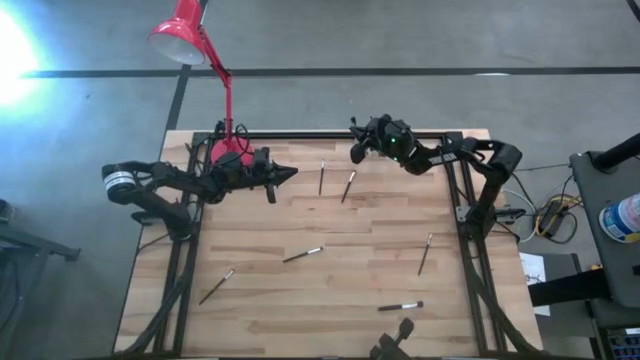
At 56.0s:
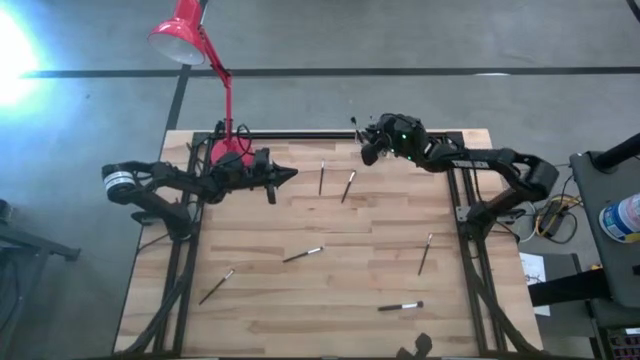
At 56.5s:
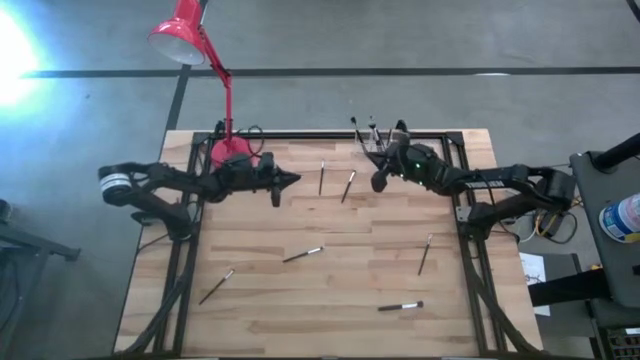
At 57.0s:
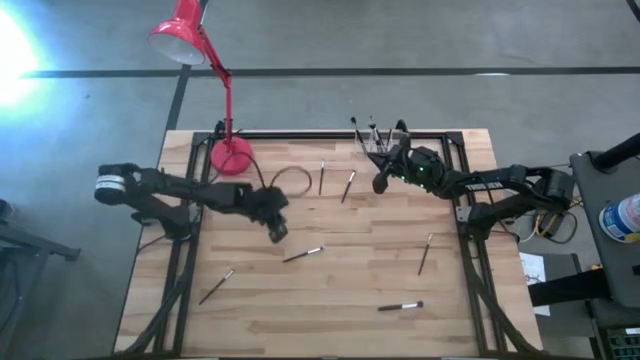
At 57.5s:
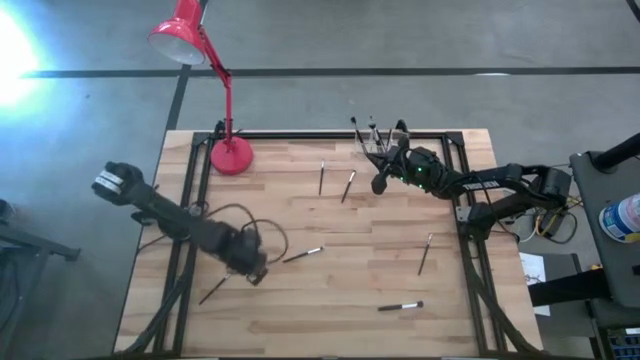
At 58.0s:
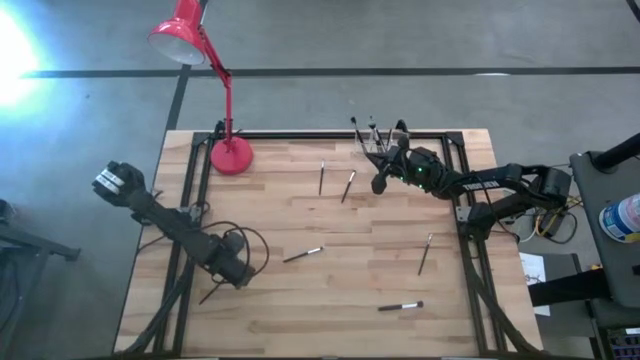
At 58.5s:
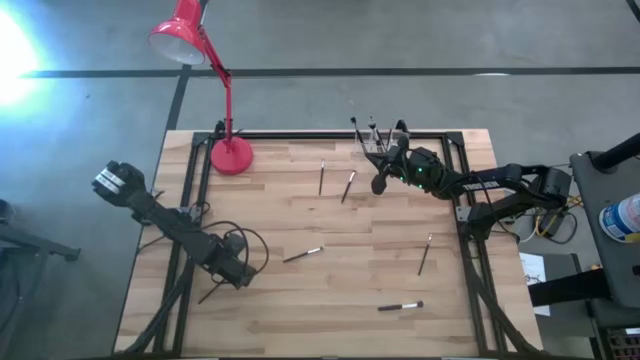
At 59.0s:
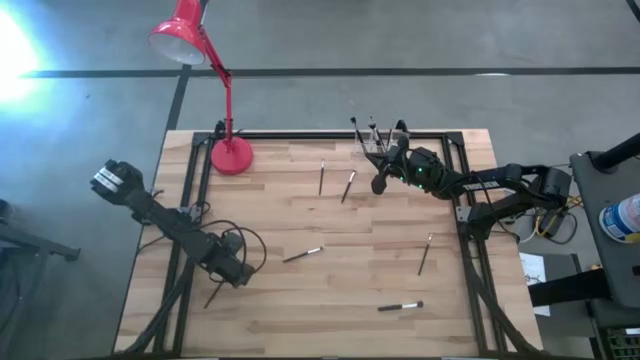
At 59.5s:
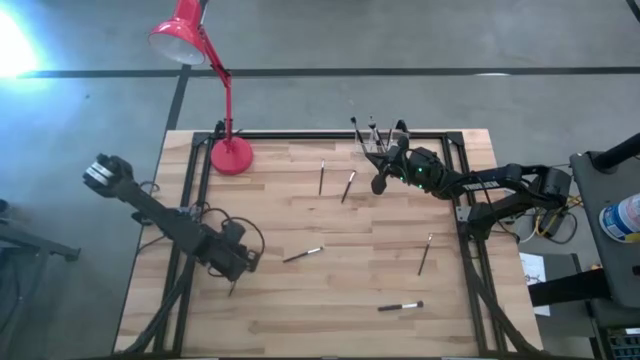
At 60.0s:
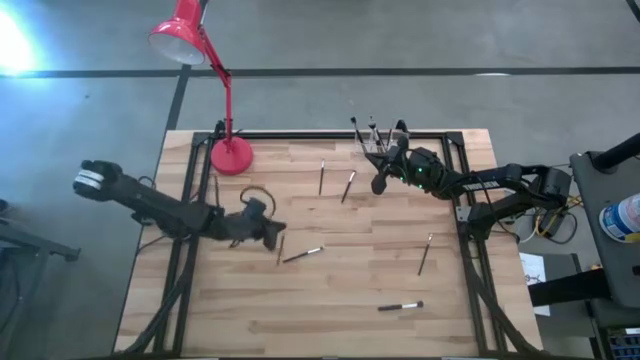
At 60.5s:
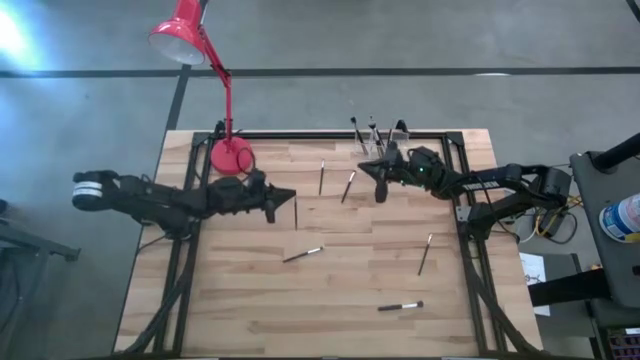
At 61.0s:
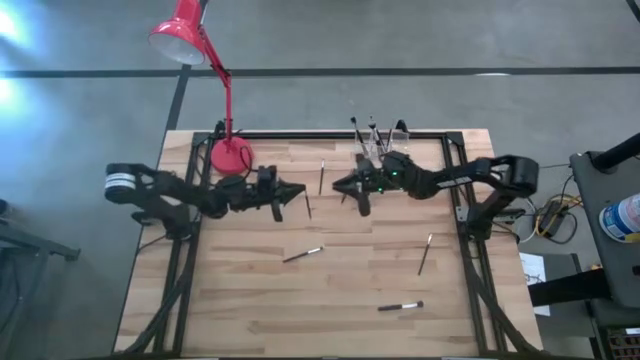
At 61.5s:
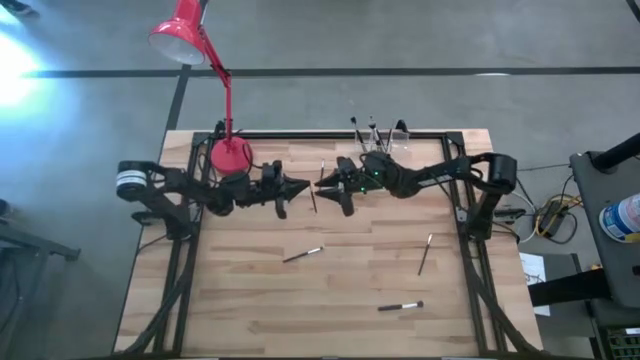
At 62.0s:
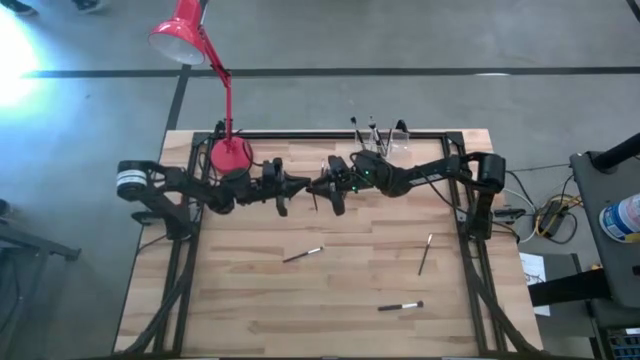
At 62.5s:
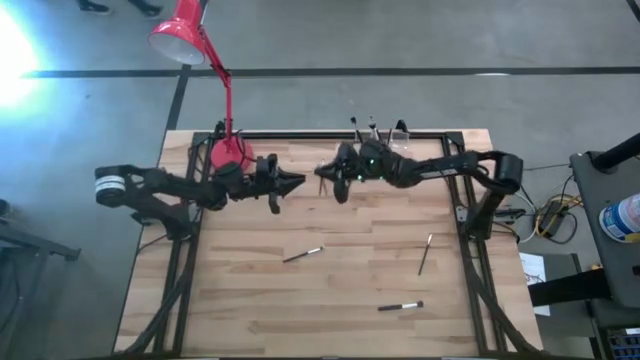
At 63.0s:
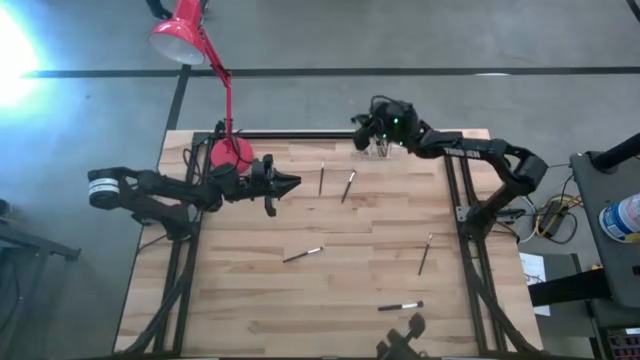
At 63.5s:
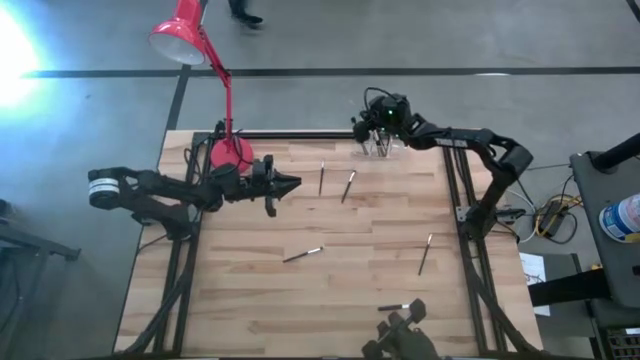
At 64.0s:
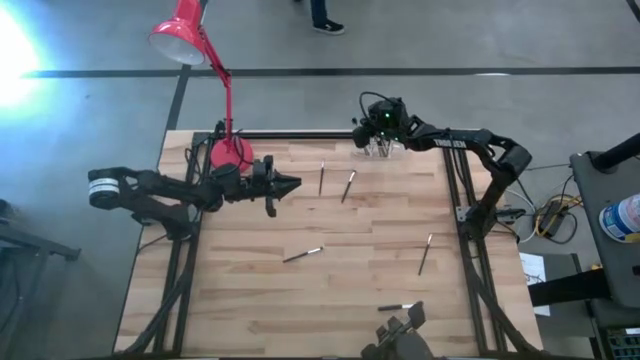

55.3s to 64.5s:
Task: Put items in baskets/containers
Put the eyebrow brush into the transparent organizer

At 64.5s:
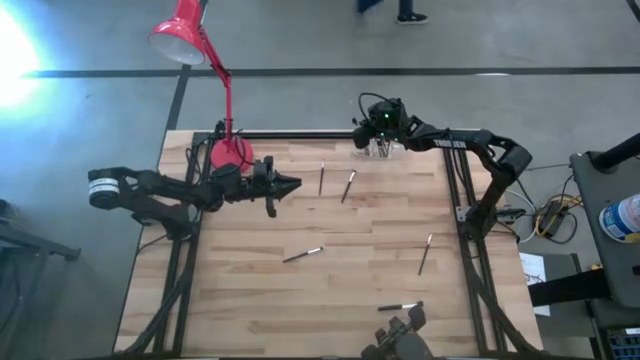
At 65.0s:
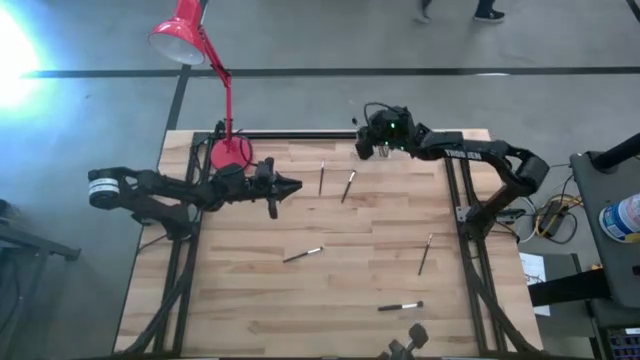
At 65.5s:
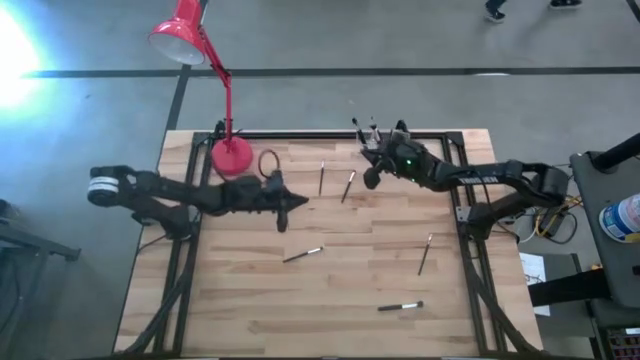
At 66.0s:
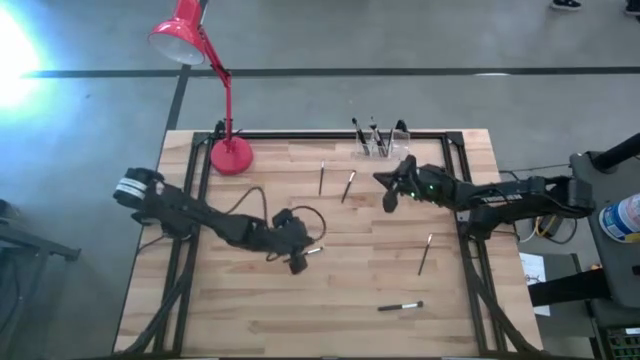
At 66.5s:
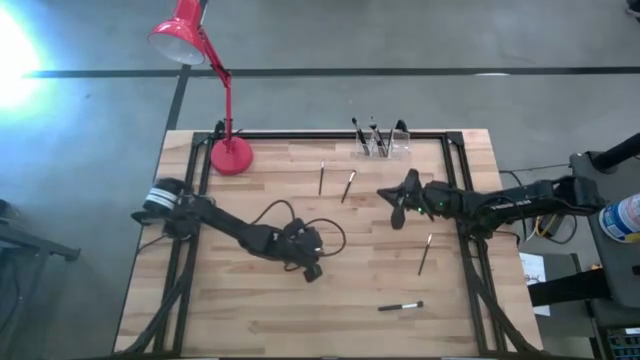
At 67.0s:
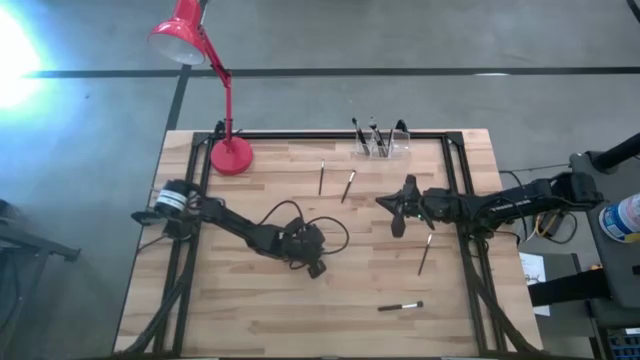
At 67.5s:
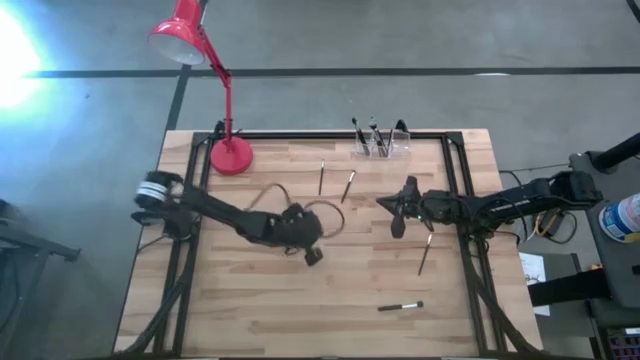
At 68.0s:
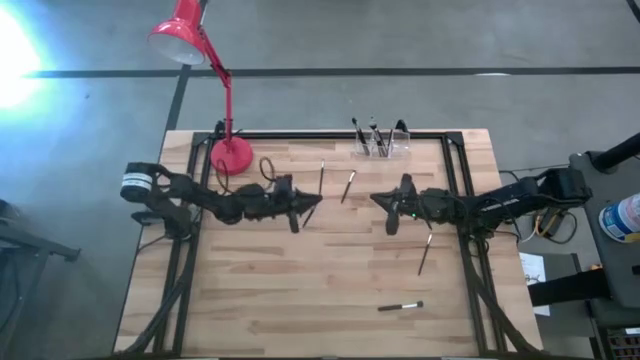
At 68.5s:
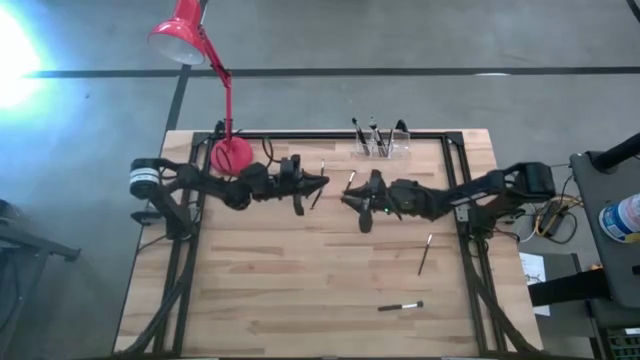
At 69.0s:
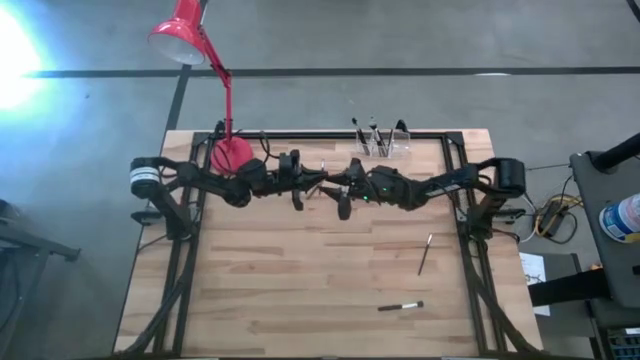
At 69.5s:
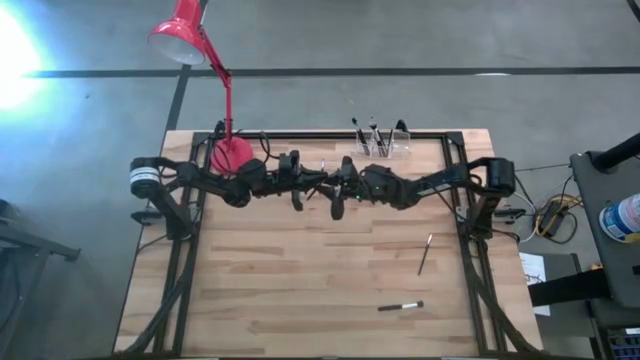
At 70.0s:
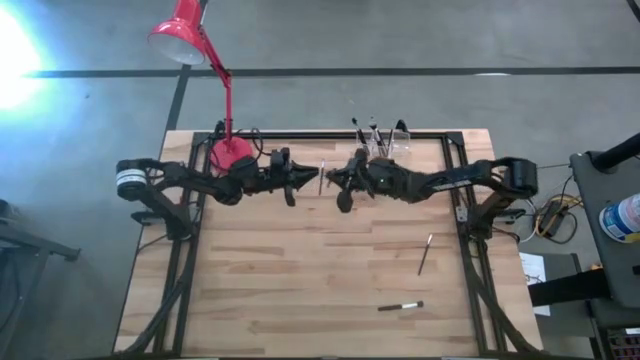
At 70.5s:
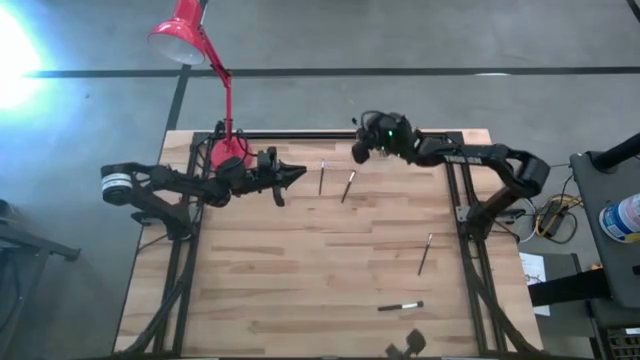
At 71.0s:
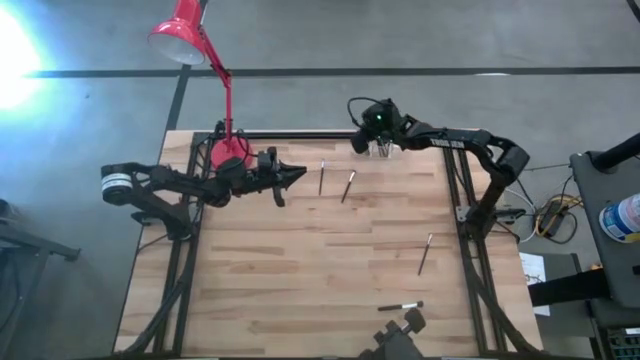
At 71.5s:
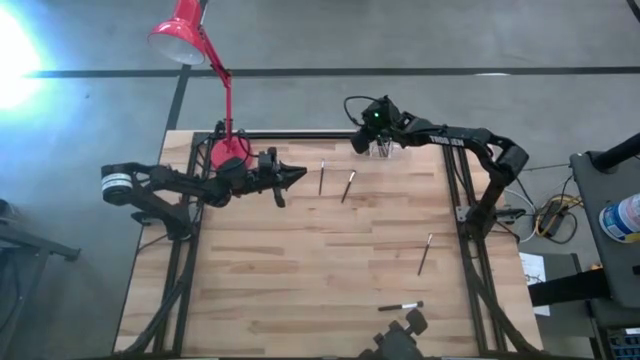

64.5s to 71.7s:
Put the foundation brush into the transparent organizer

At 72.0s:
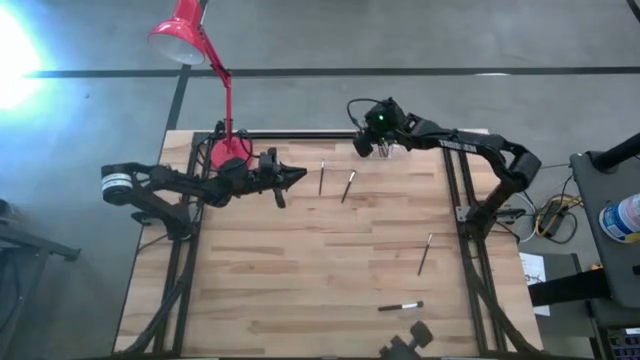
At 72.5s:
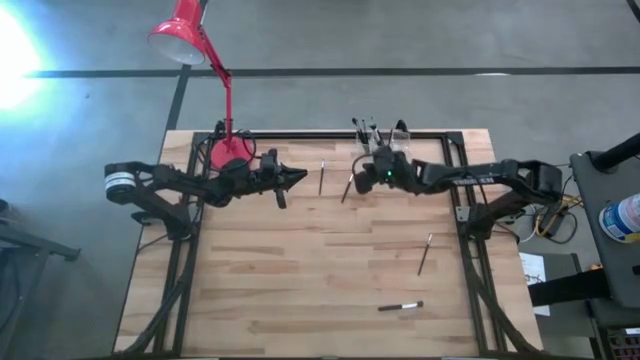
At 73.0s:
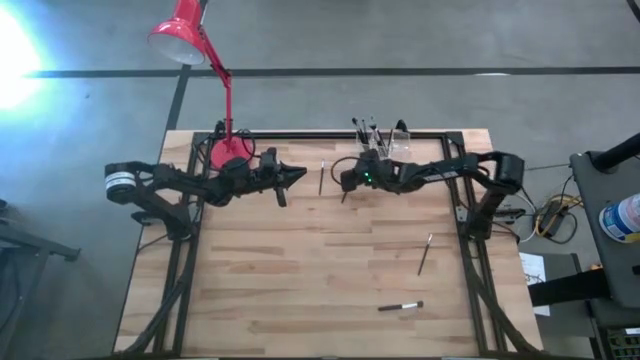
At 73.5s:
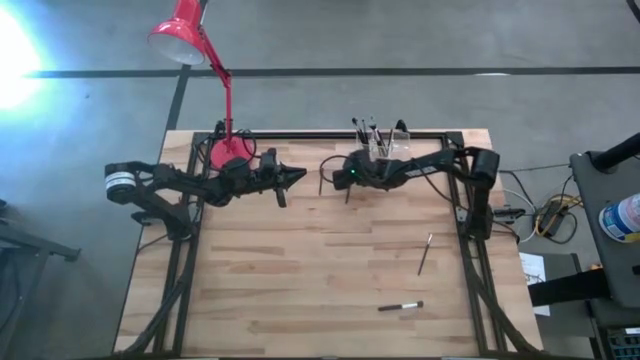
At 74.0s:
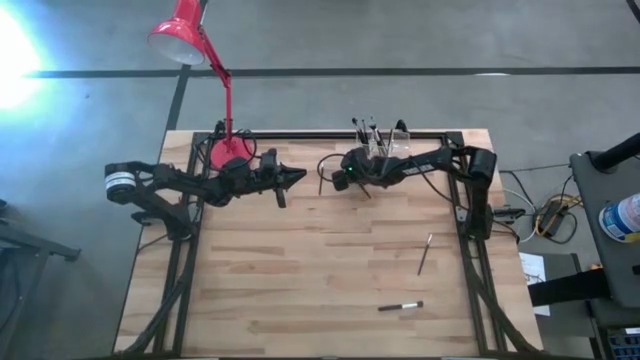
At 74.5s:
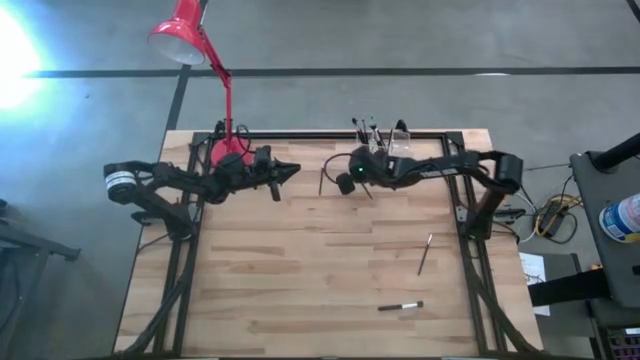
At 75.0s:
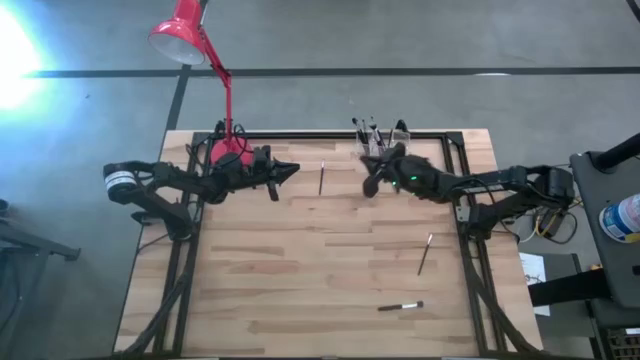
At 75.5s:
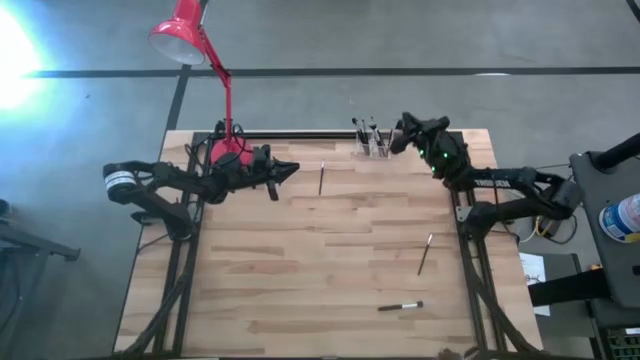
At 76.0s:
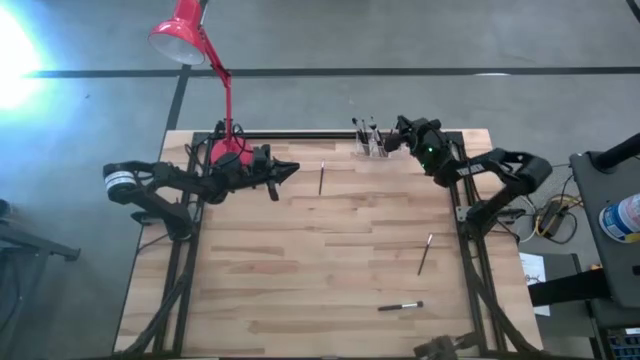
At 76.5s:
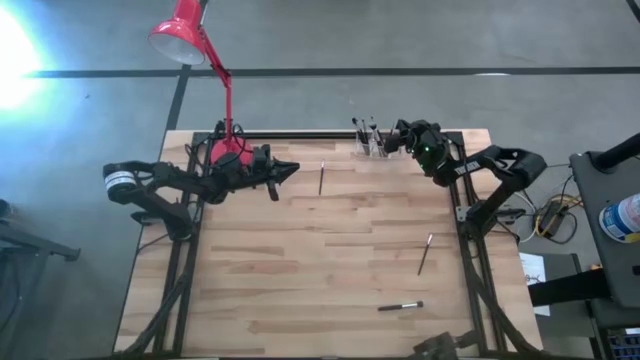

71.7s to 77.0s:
Put the eyeshadow brush into the transparent organizer

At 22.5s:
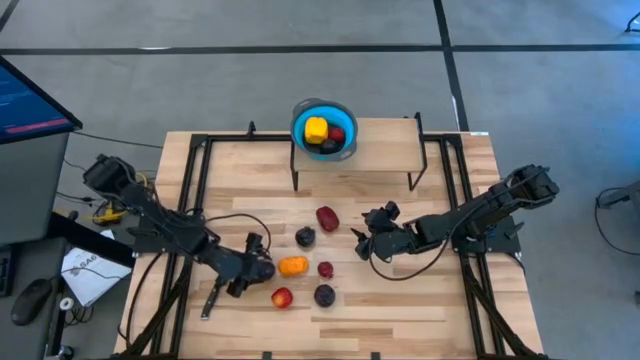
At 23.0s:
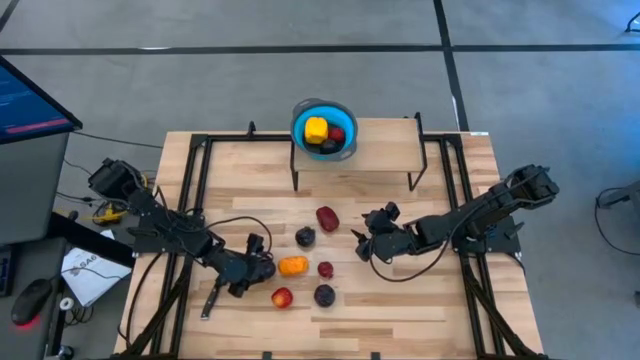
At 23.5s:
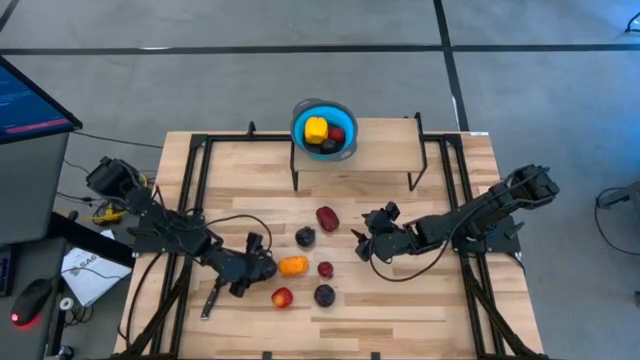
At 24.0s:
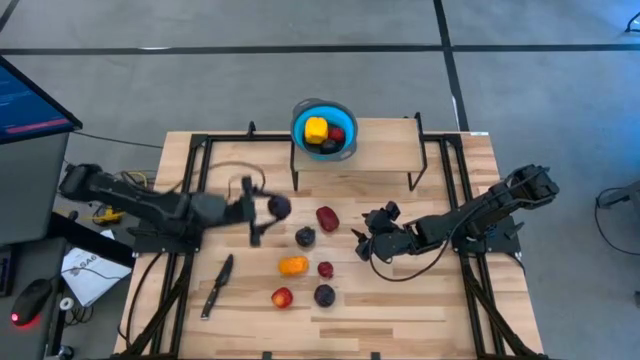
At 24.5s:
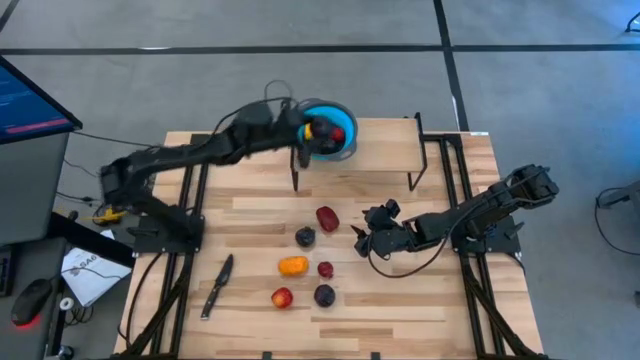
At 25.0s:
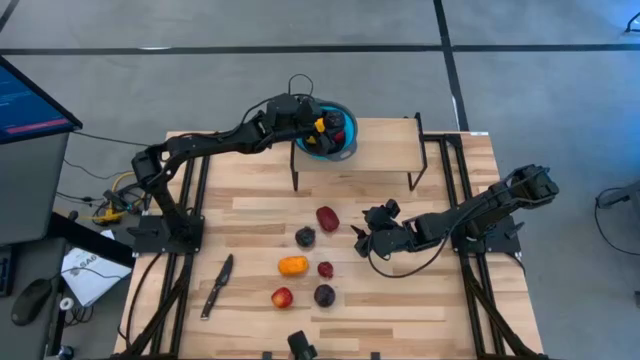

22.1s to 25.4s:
Task: Pick & Place Fruit
Put the left purple plum into the blue strainer bowl on the shelf
